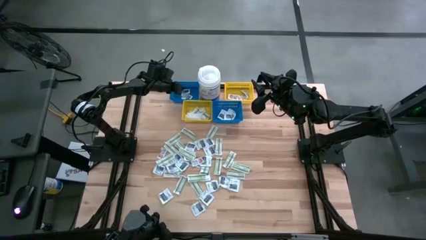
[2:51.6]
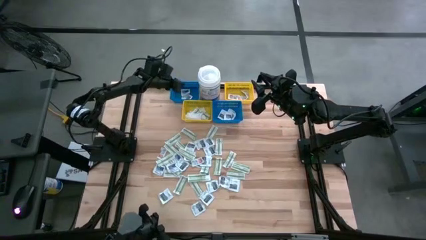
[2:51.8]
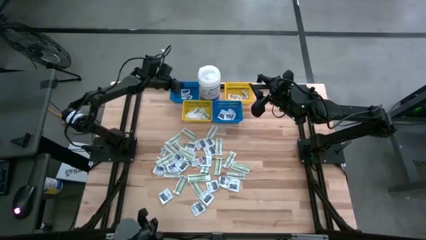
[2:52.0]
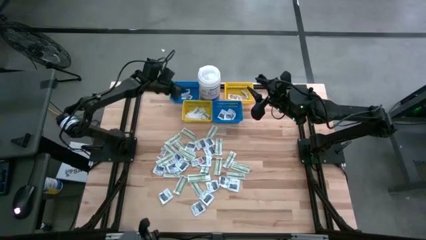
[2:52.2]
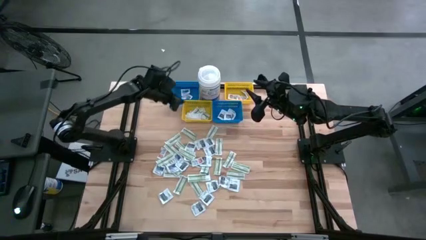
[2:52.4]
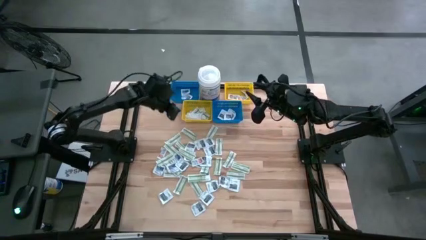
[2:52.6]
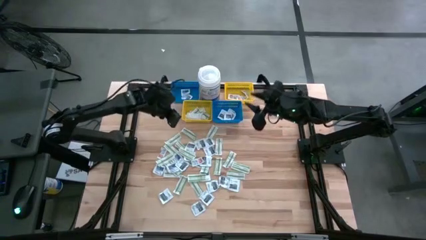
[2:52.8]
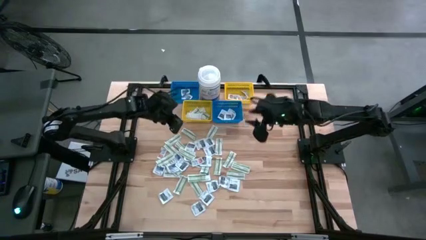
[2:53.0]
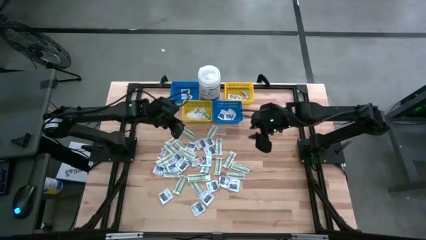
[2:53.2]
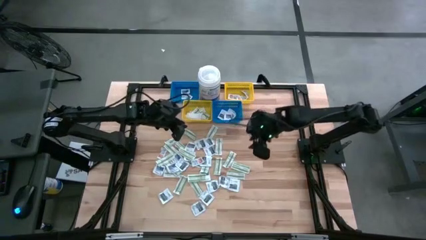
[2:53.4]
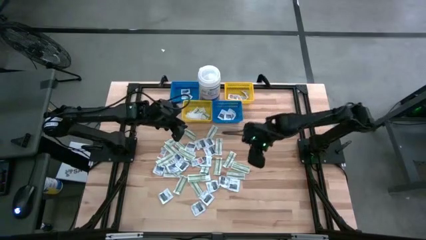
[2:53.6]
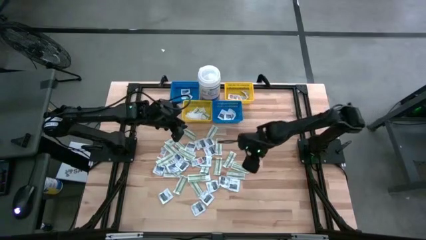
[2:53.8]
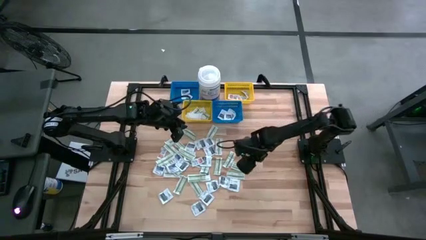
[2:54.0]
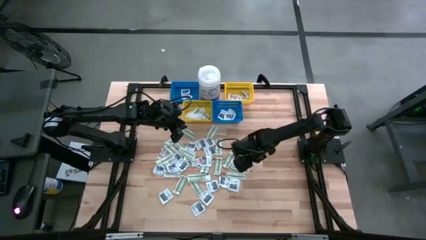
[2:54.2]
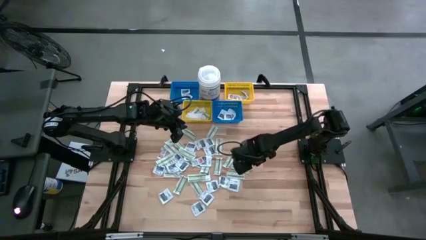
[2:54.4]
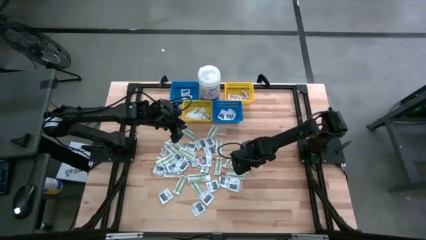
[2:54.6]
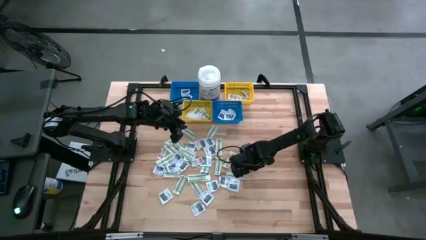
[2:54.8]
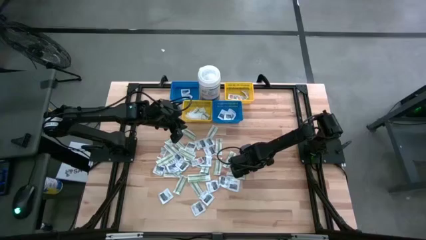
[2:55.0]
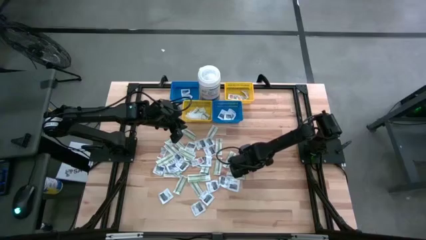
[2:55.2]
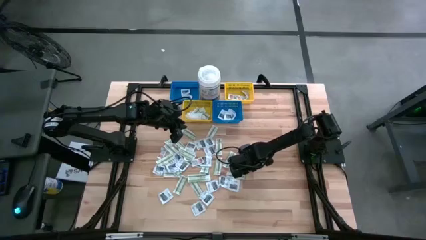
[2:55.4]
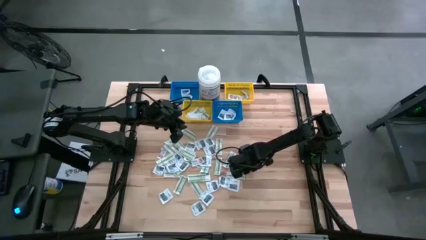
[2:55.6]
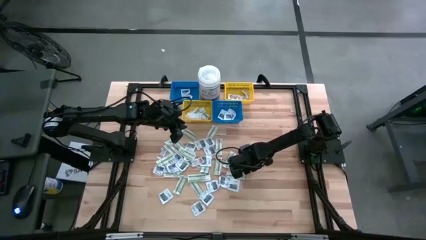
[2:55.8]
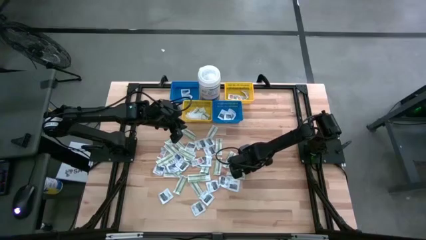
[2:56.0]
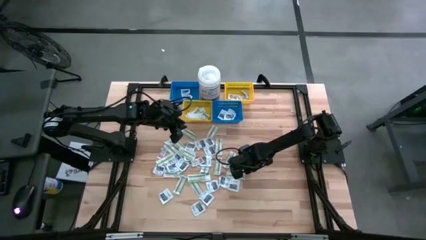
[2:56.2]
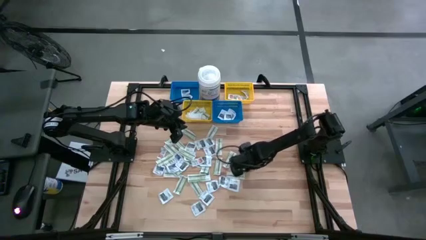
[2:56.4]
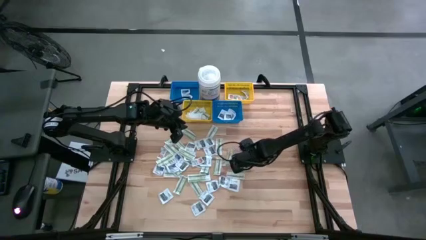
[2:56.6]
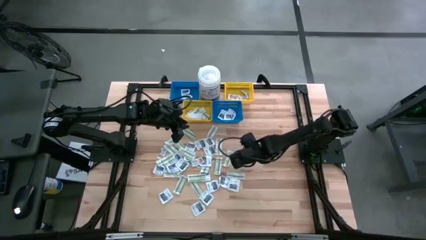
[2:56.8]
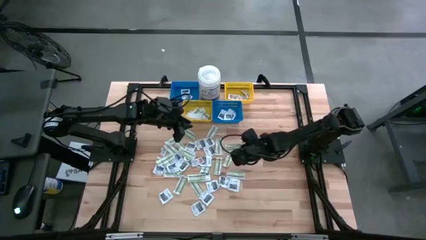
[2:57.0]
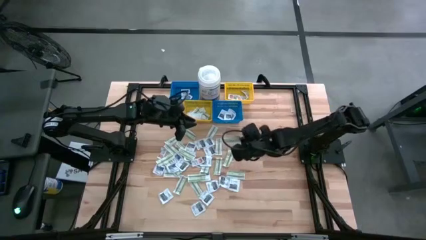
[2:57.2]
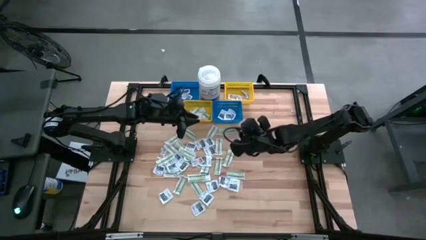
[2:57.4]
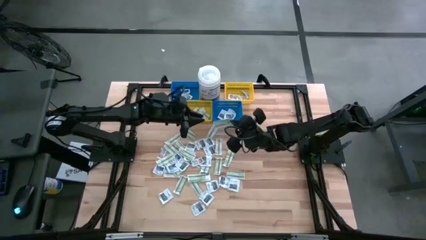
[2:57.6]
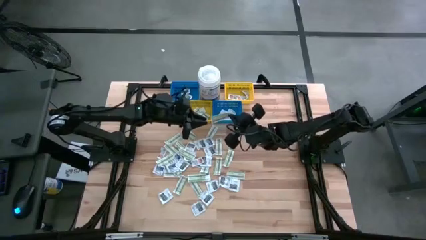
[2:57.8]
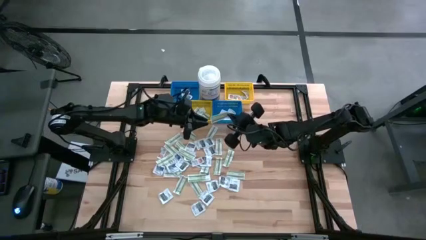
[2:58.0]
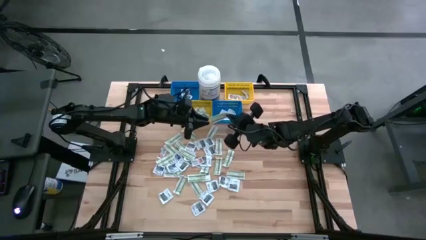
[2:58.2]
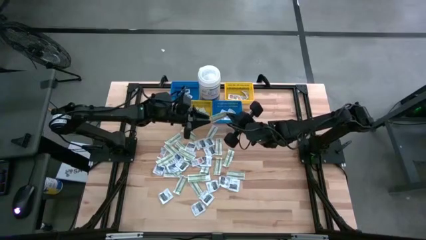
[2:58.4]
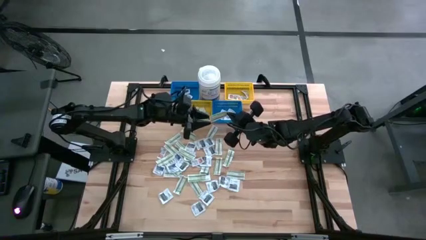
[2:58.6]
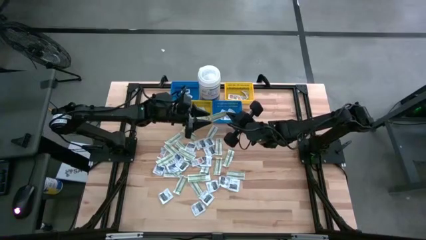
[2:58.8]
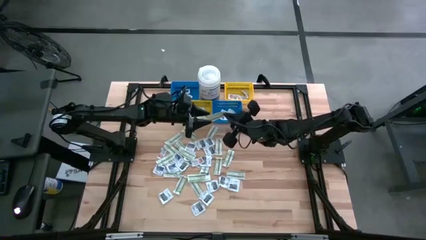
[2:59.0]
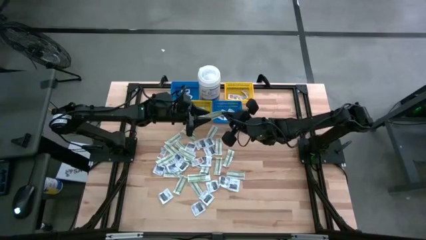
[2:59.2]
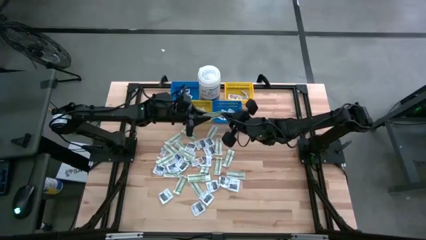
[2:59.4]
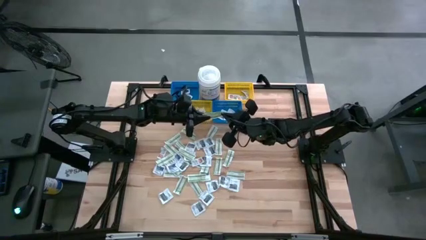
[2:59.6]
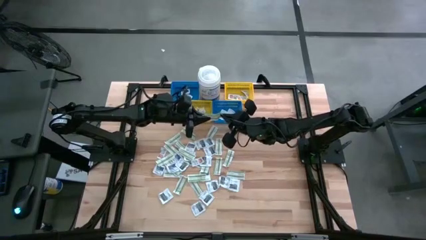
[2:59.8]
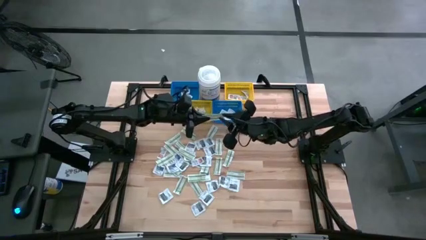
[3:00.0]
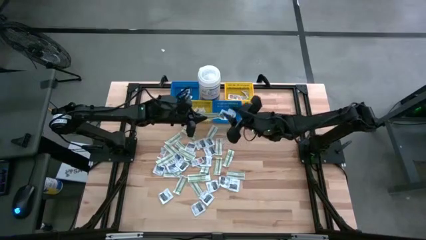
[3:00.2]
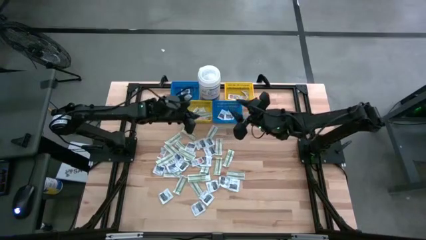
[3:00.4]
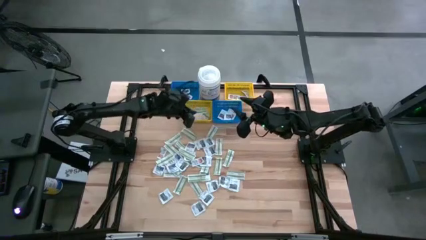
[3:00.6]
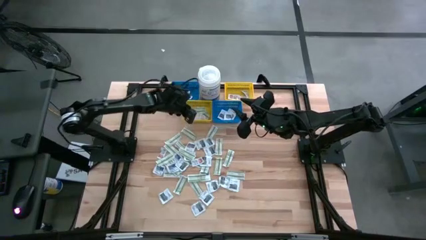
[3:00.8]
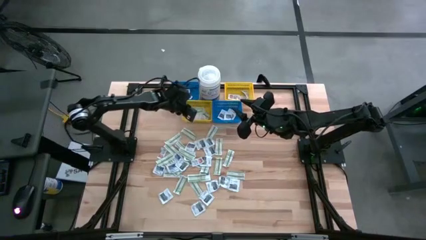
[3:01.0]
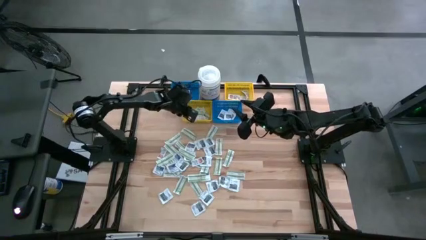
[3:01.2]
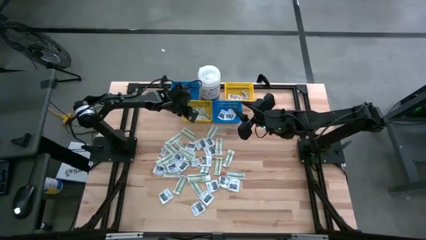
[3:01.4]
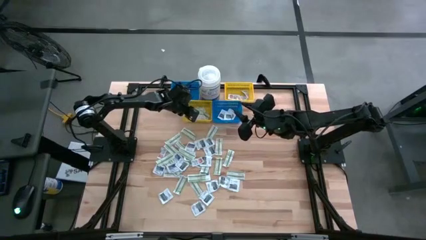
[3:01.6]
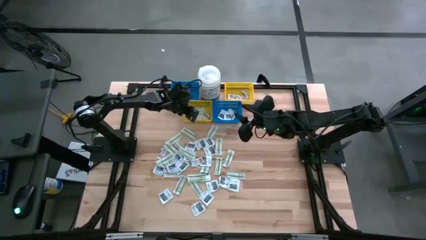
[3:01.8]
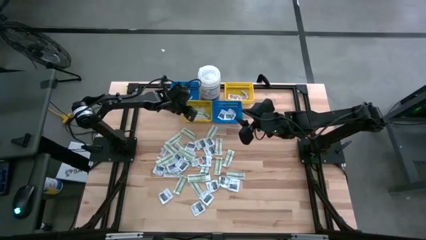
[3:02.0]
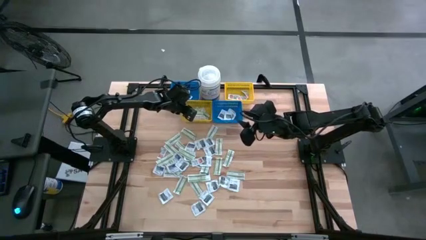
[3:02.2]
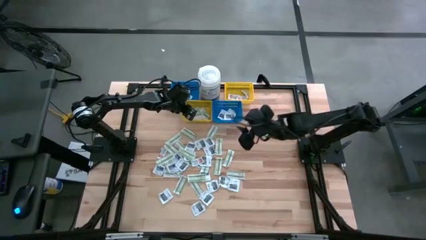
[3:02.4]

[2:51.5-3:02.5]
Task: Pick & Place First Aid Supplies
Put the green bandage pad into the left yellow bin

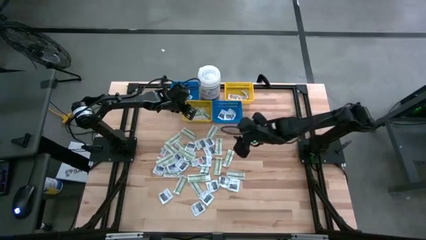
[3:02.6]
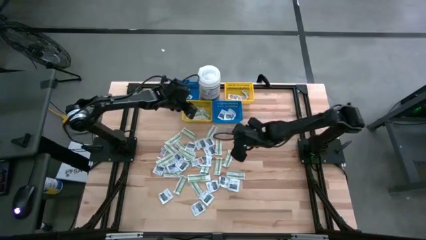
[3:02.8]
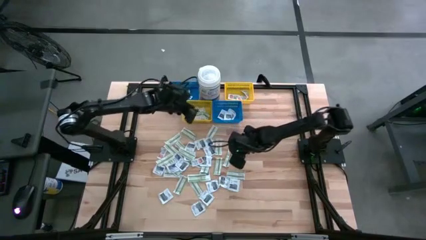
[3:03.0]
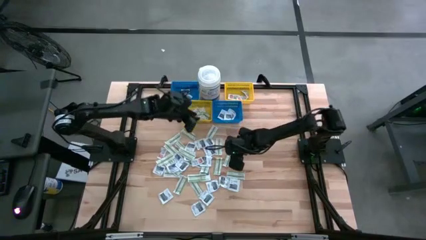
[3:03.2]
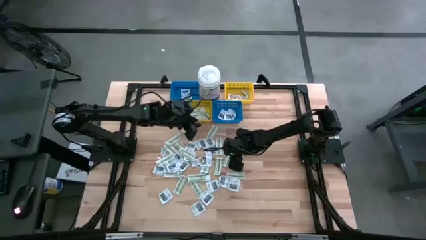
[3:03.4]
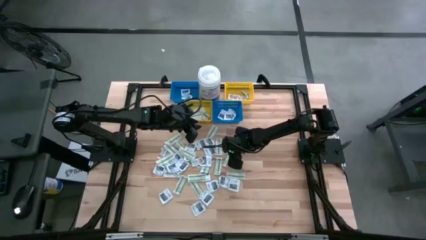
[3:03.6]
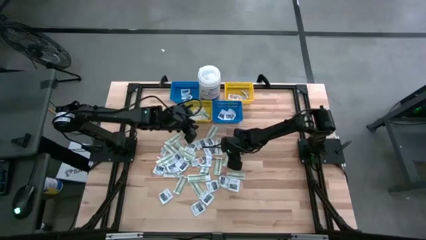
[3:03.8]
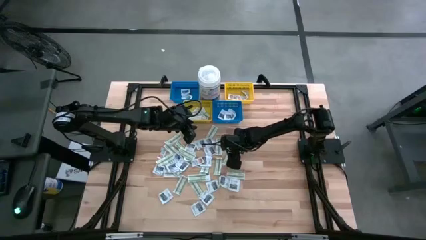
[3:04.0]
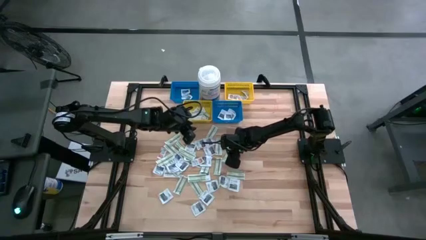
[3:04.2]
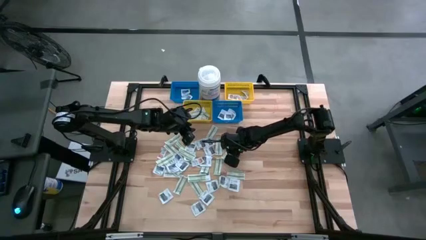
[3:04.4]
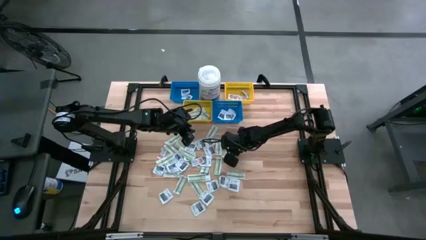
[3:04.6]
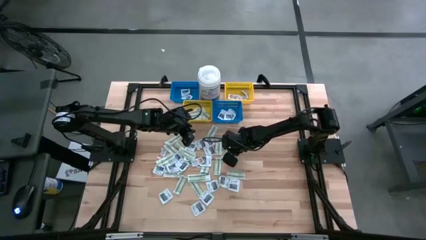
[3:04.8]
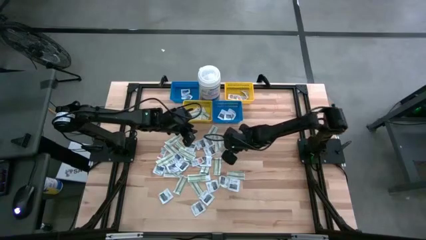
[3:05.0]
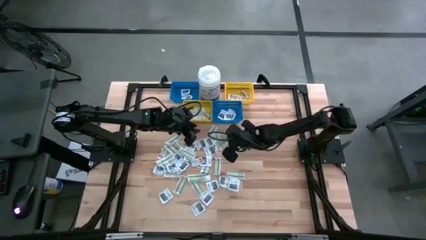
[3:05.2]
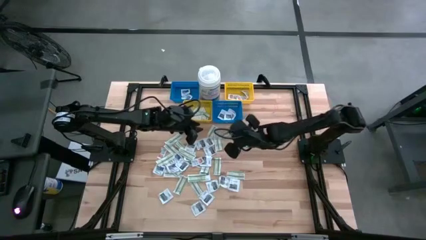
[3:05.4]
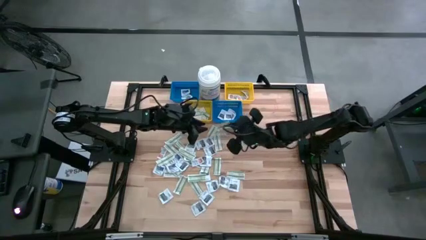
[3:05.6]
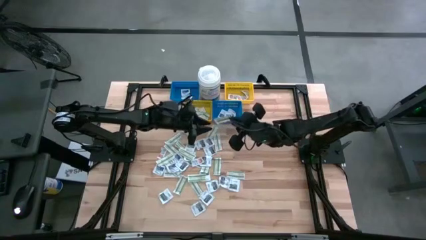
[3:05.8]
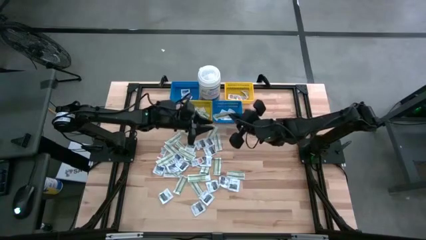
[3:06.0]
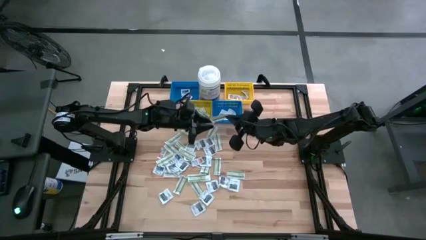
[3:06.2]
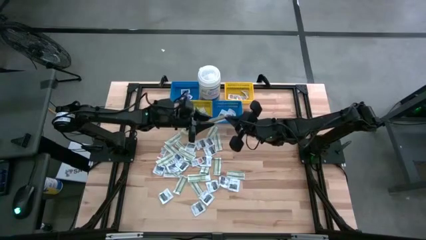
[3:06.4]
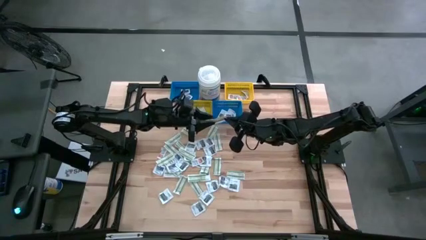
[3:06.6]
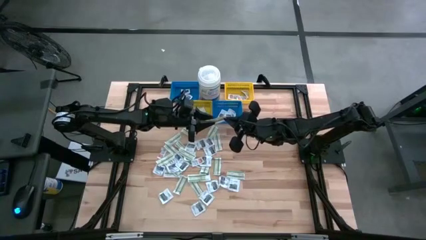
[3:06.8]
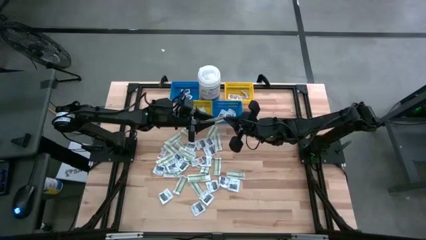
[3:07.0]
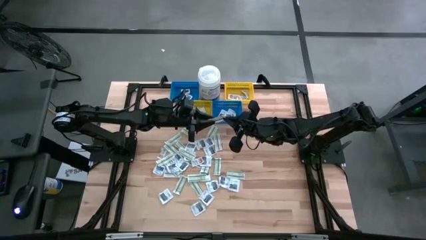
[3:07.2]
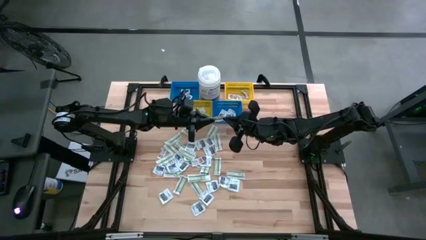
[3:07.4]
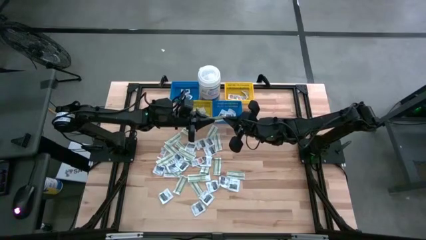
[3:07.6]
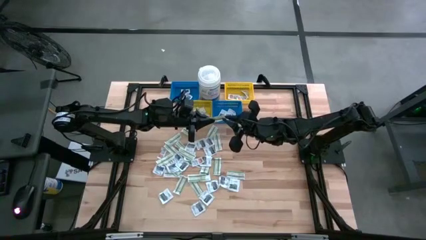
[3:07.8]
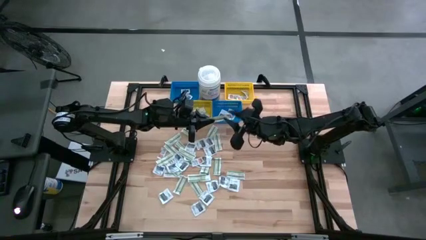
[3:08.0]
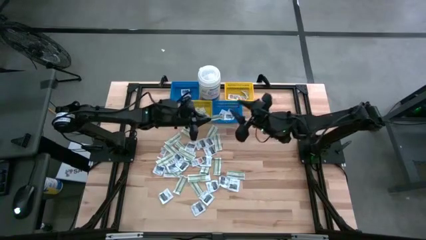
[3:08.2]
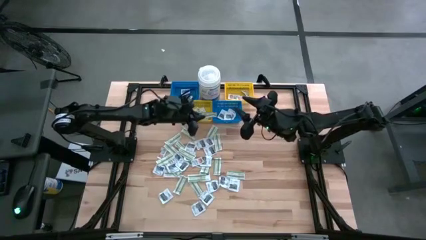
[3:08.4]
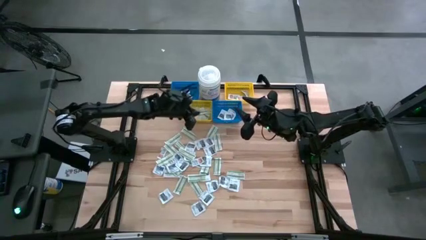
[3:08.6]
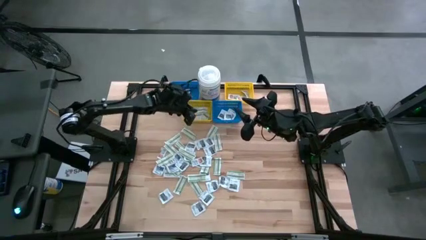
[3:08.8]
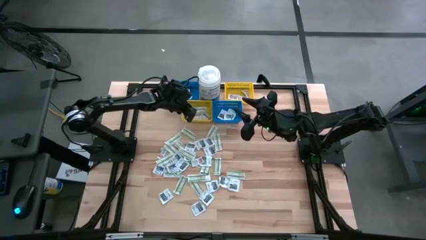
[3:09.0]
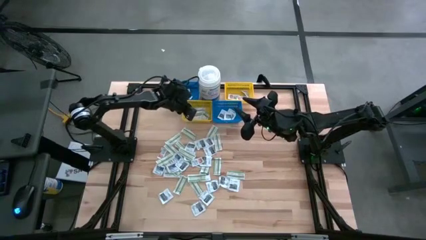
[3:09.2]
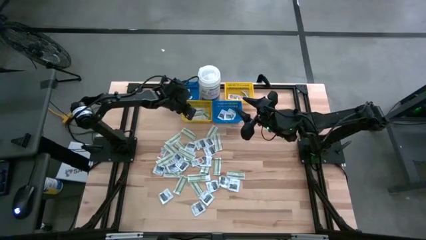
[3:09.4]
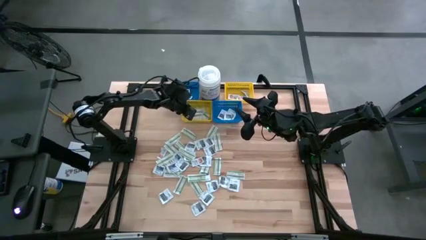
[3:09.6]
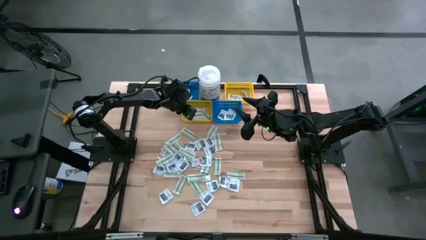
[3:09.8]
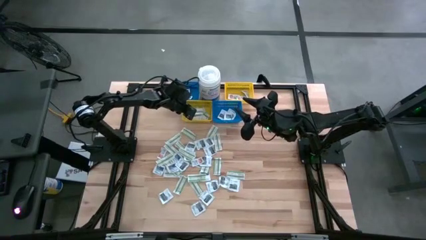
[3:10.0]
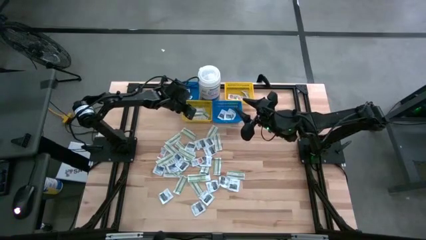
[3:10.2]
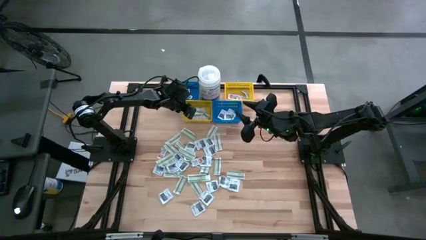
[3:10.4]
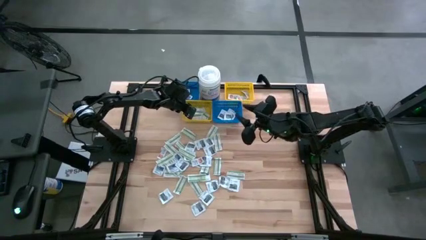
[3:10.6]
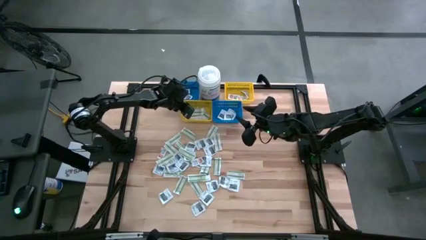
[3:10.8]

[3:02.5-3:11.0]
Put the green bandage pad into the left yellow bin
